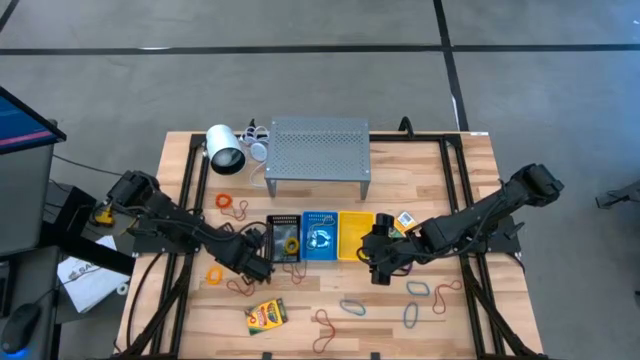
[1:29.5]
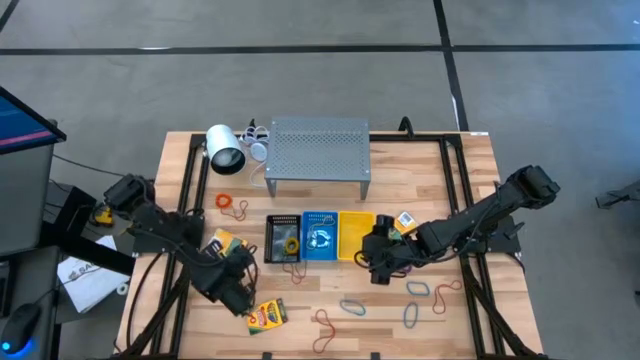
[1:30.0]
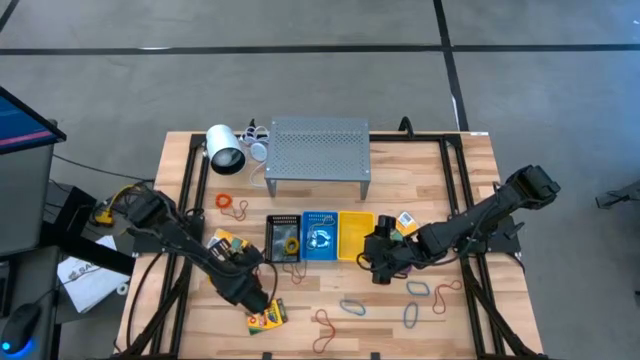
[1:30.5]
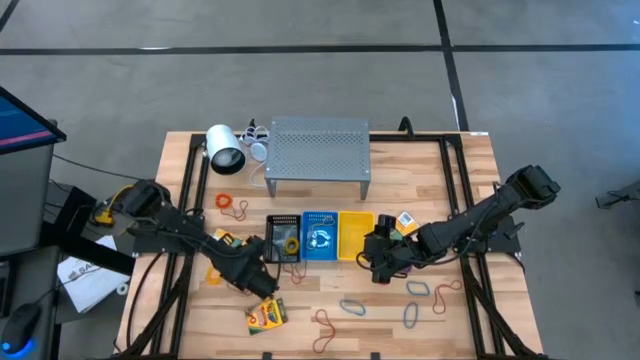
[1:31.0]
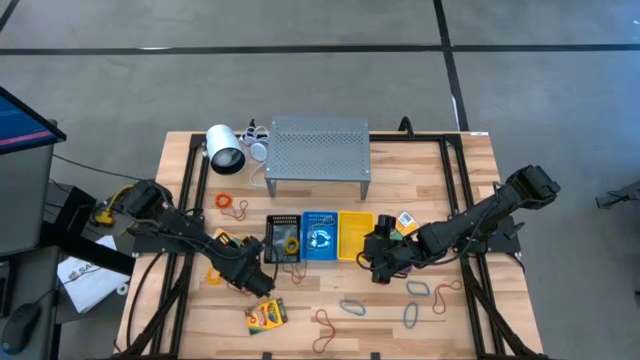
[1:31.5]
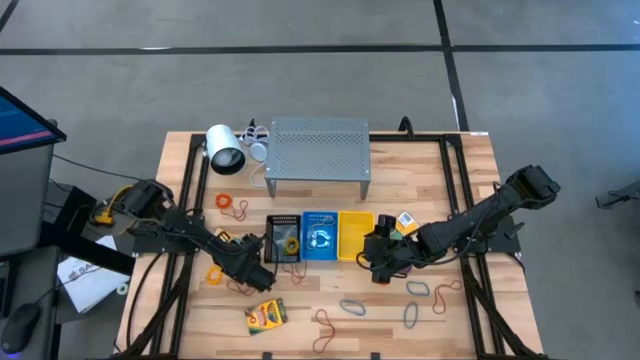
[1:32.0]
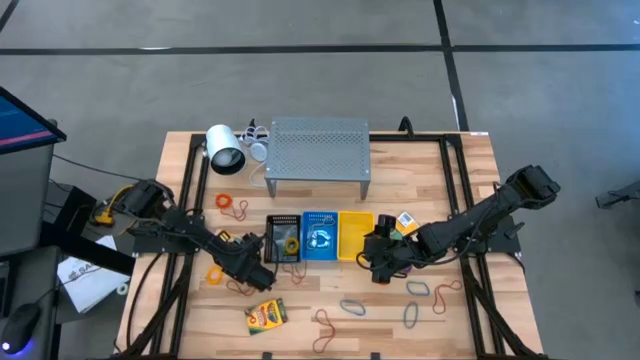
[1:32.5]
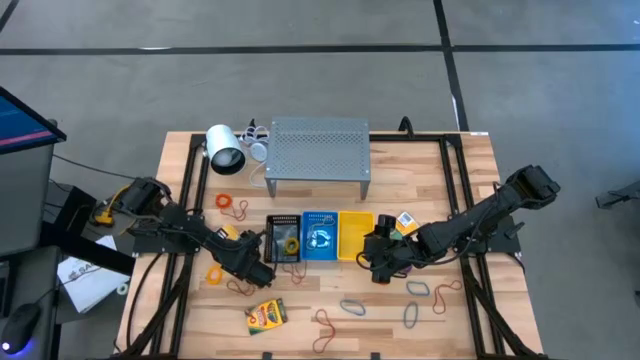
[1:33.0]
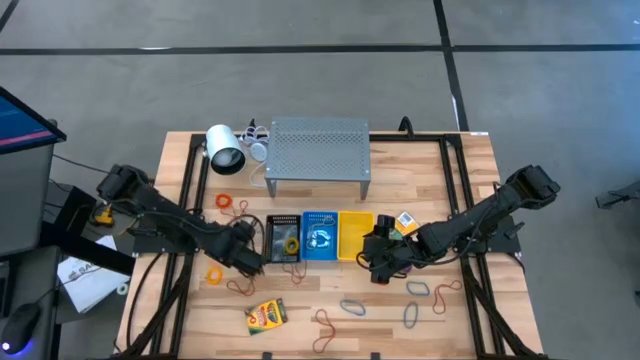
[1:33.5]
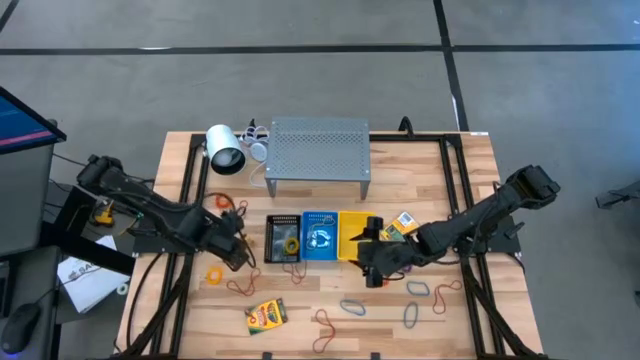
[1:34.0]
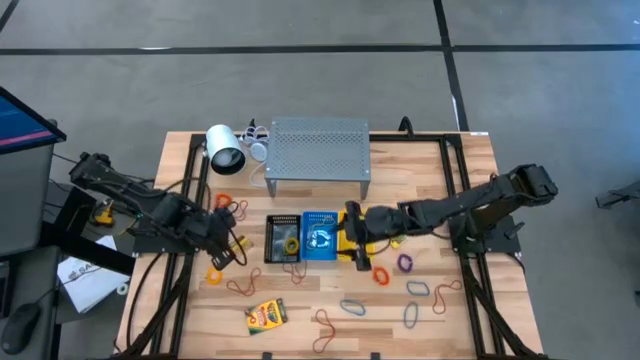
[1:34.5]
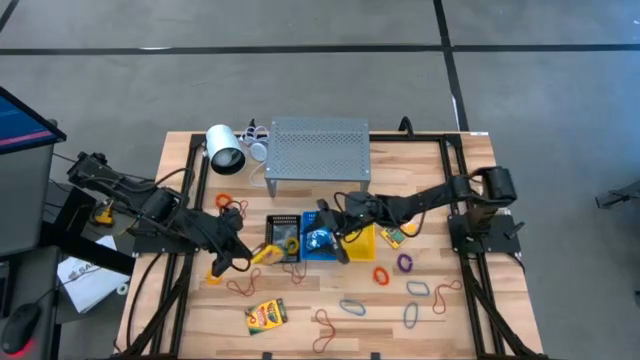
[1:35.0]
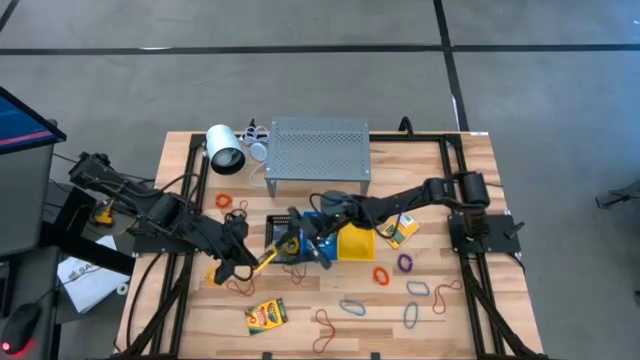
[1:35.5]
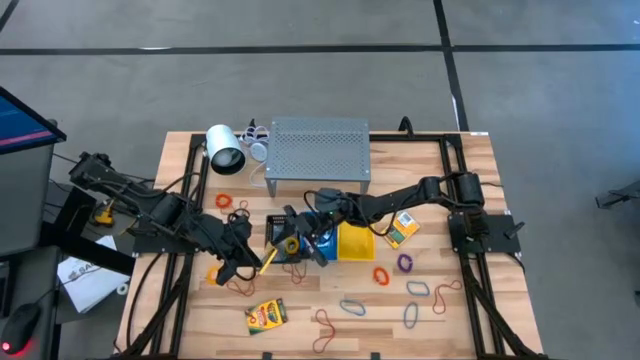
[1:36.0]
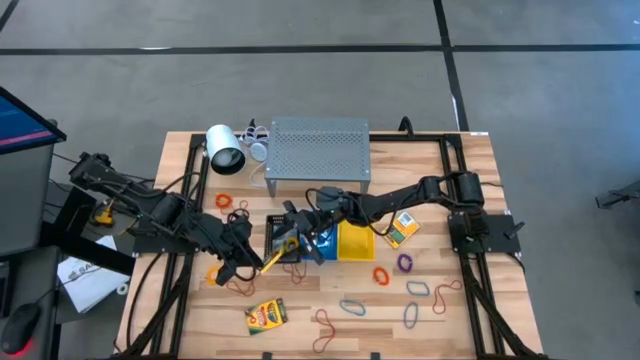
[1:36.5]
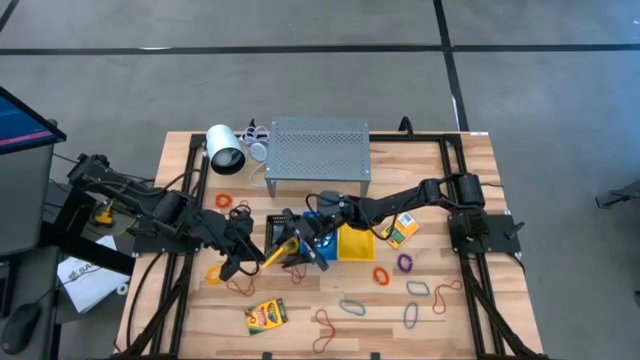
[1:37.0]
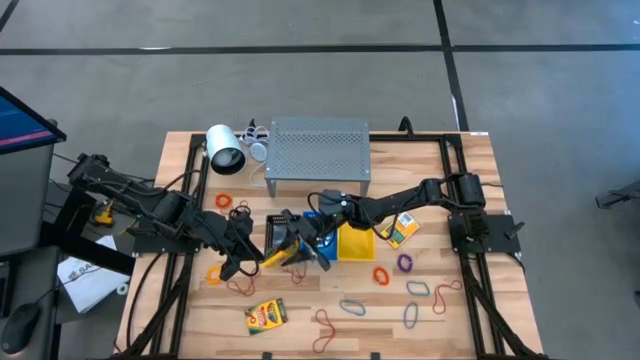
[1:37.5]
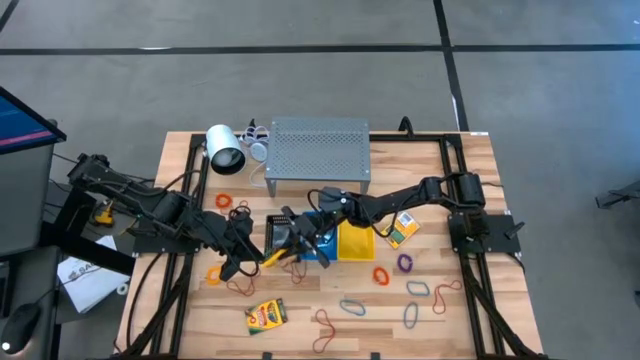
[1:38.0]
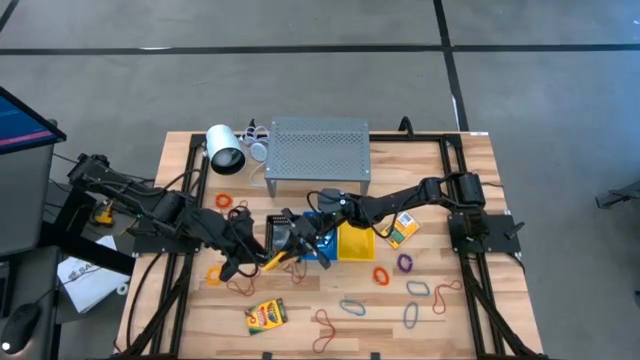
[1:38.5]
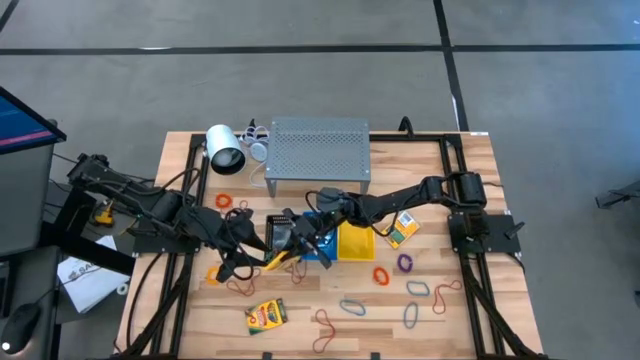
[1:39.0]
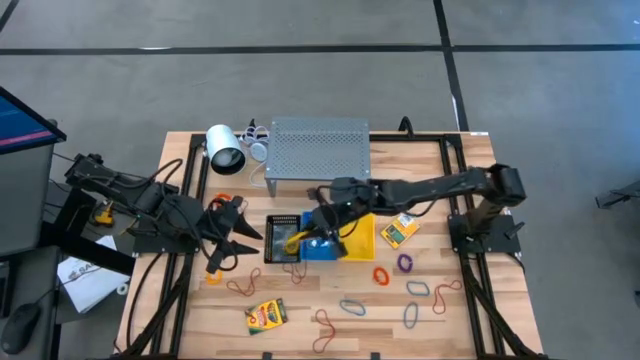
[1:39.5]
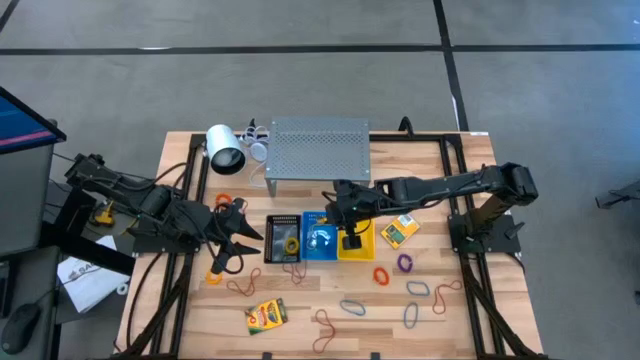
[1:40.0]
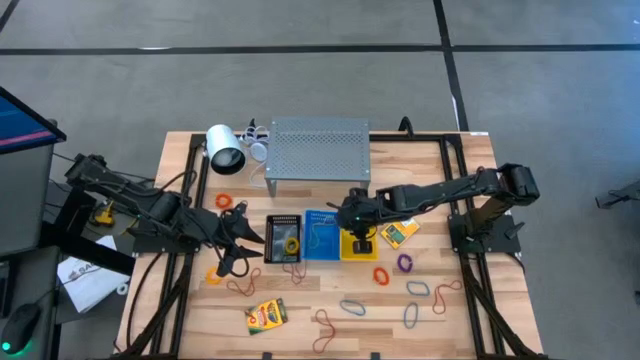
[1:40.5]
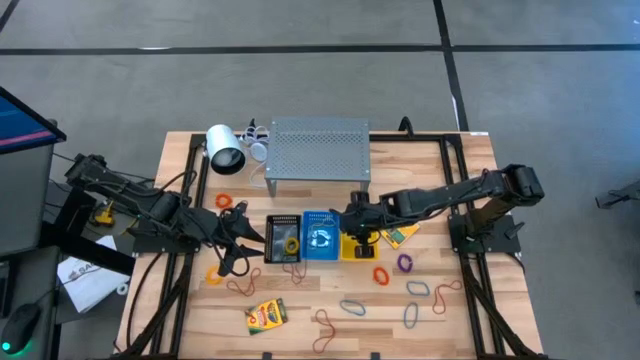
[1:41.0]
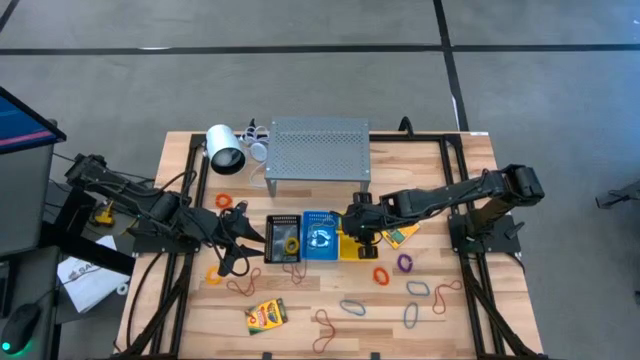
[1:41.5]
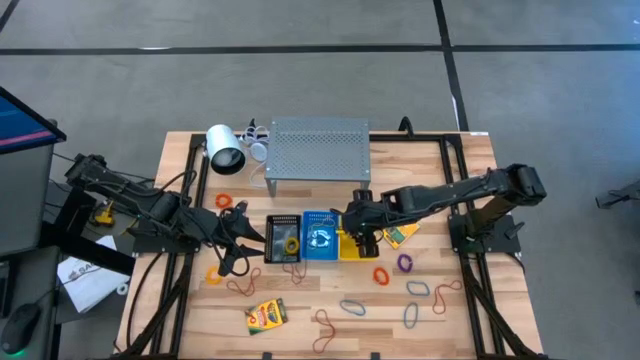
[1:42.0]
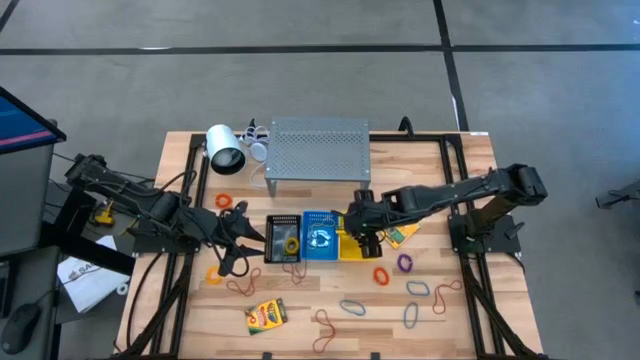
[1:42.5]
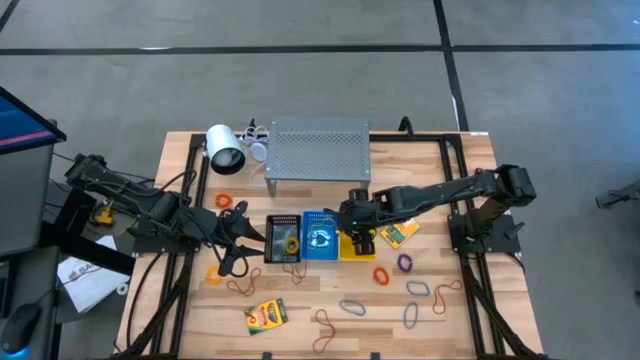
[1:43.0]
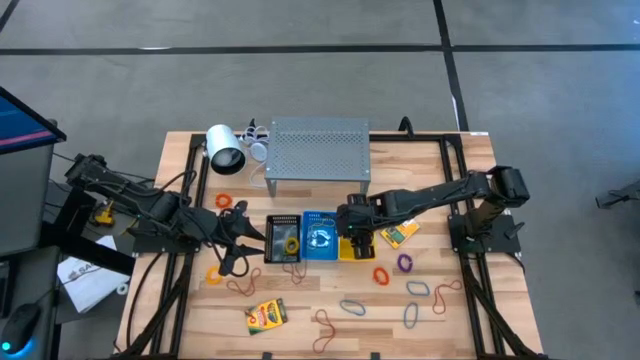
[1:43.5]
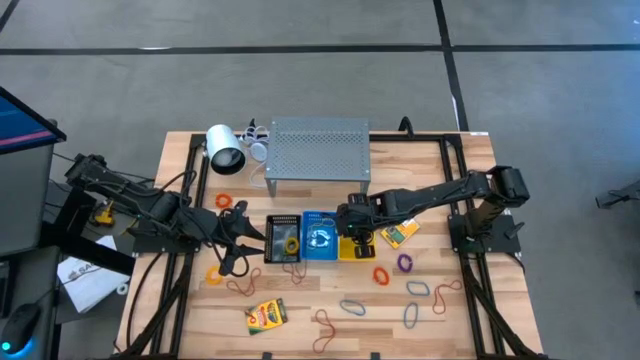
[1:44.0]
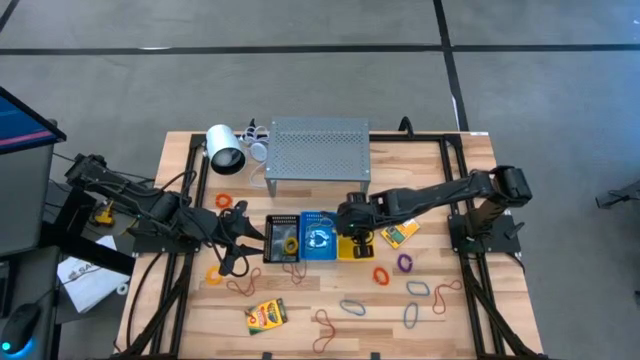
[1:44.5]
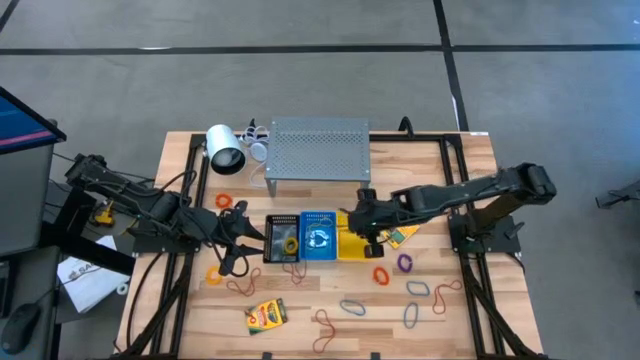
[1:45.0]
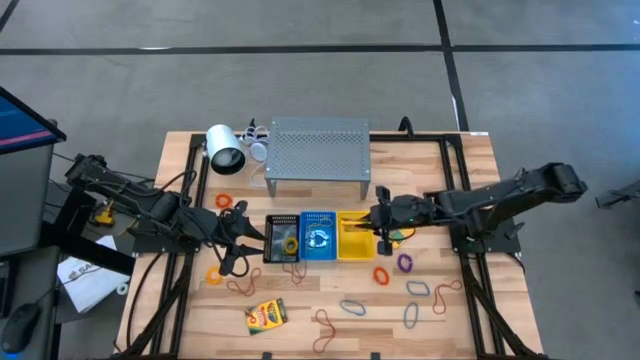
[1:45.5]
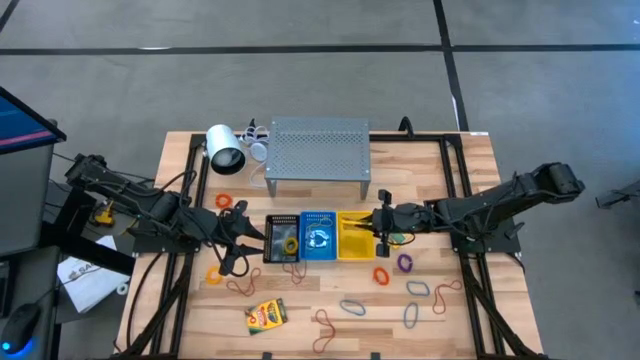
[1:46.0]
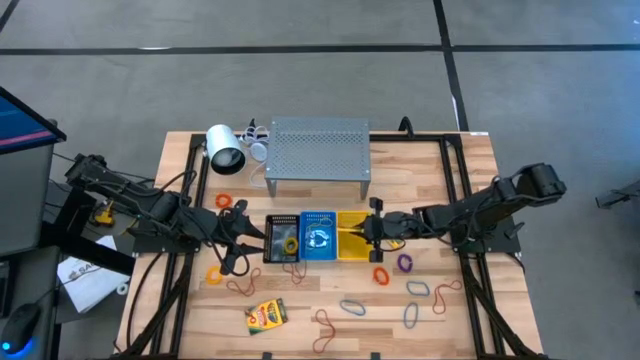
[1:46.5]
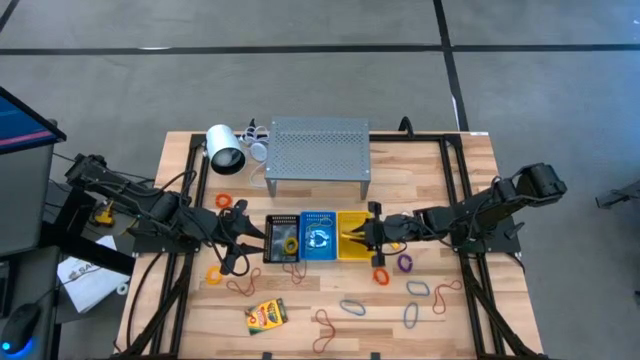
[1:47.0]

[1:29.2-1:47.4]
Task: Pick & Place Office Desk Supplies
Put the yellow crayon box into the yellow basket

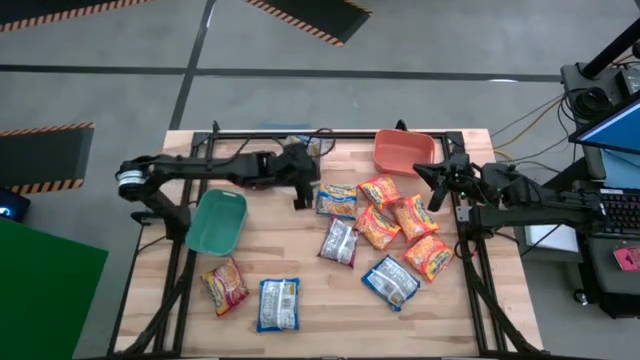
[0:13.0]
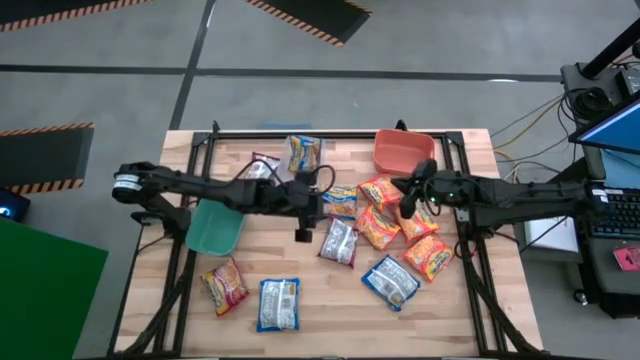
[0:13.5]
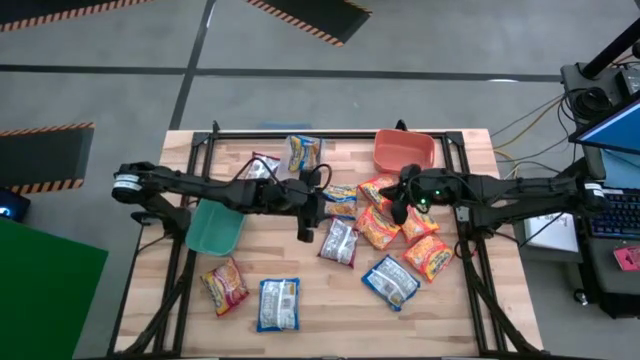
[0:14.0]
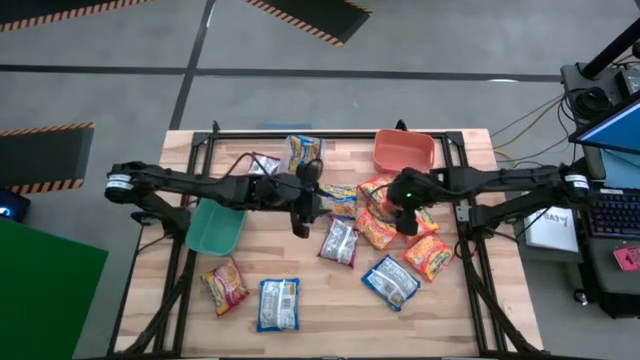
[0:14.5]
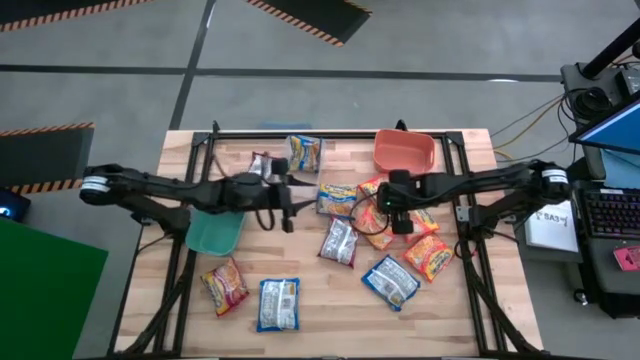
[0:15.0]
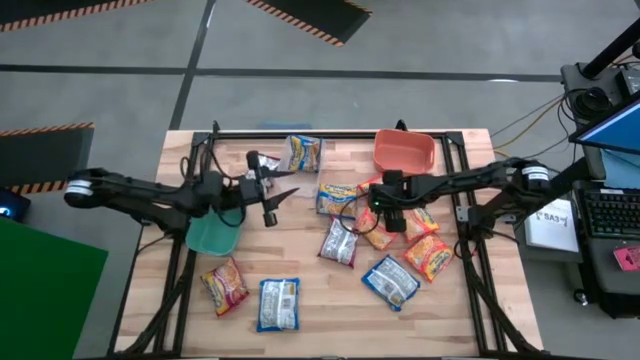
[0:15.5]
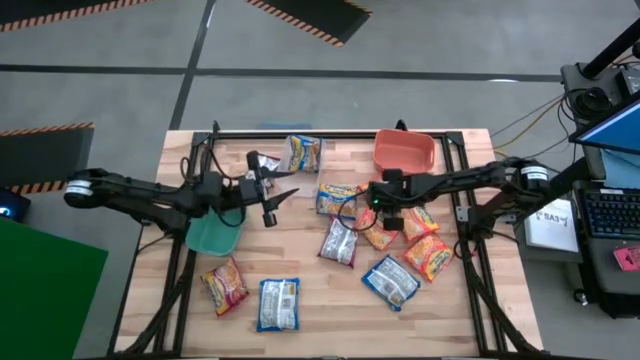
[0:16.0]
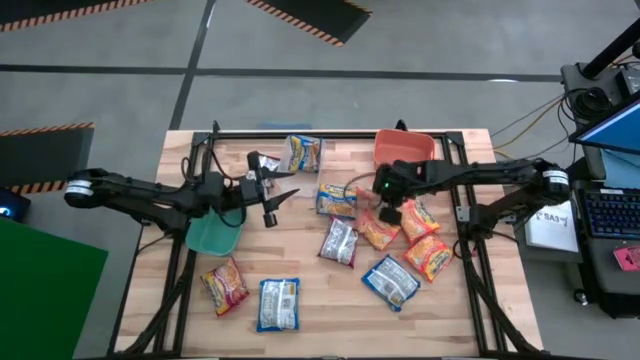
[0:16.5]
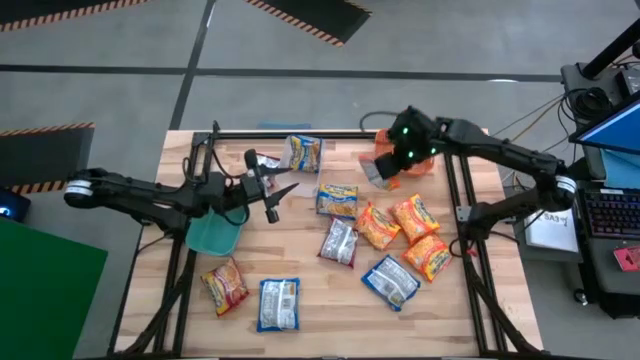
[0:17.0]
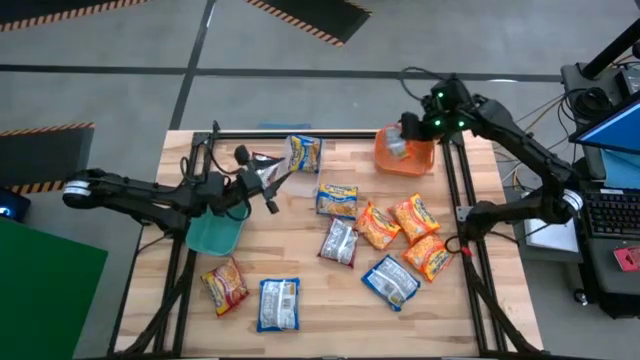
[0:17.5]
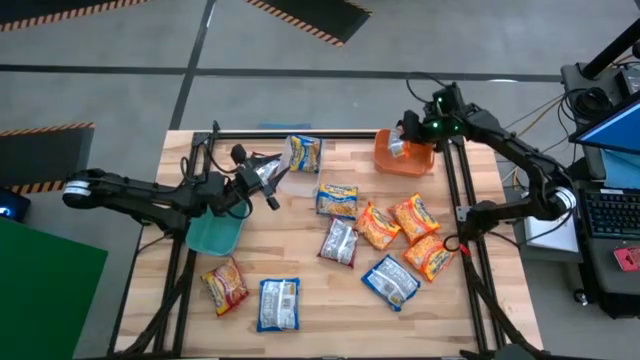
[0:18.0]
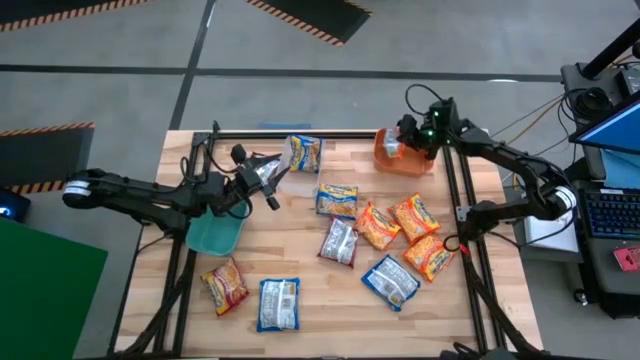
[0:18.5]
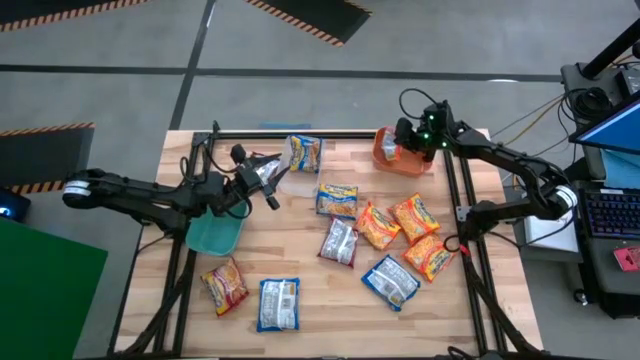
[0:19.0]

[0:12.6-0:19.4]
Task: Sort Maruchan noodles
Put the orange noodle pack into the orange bin
